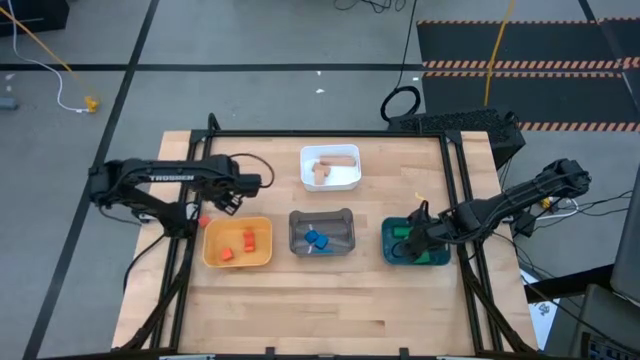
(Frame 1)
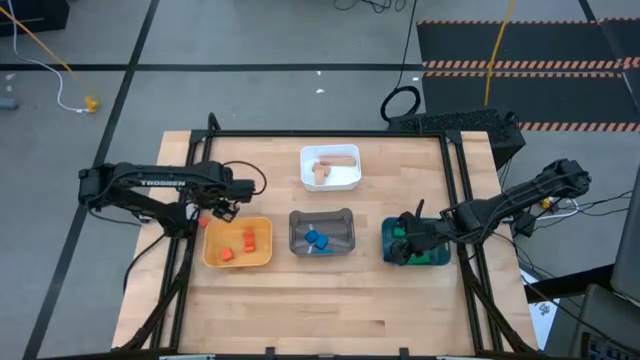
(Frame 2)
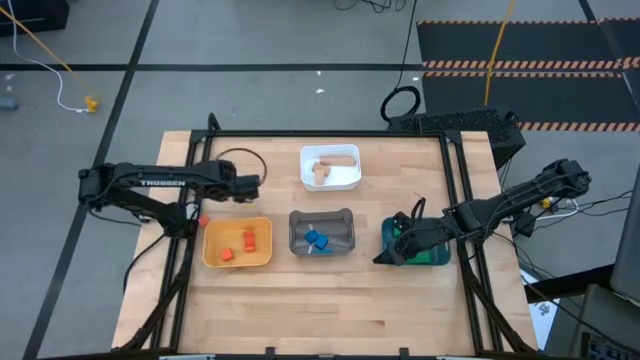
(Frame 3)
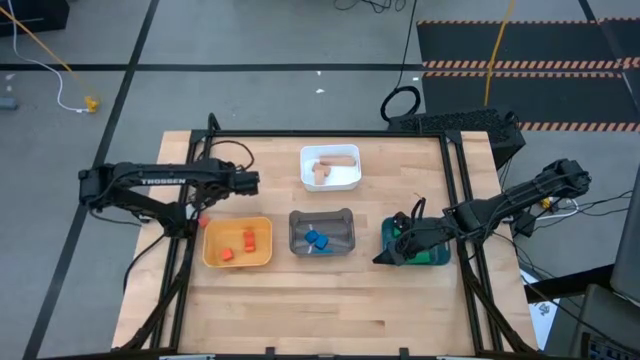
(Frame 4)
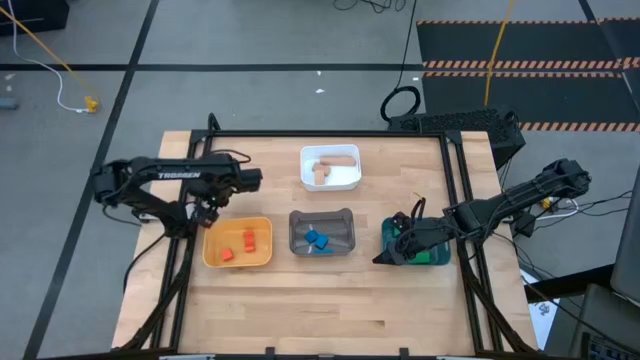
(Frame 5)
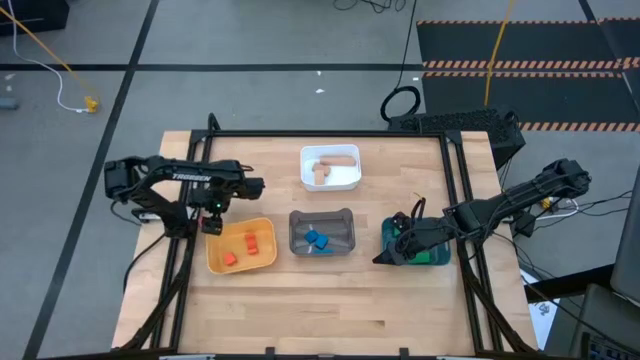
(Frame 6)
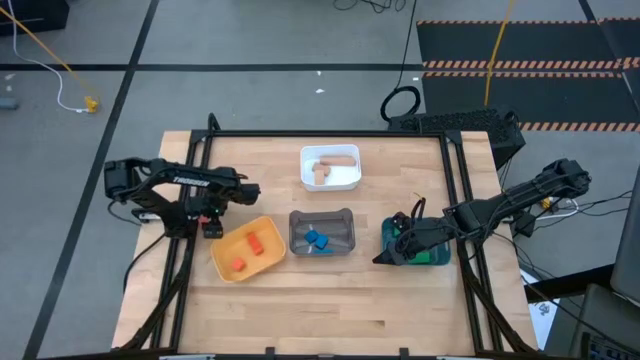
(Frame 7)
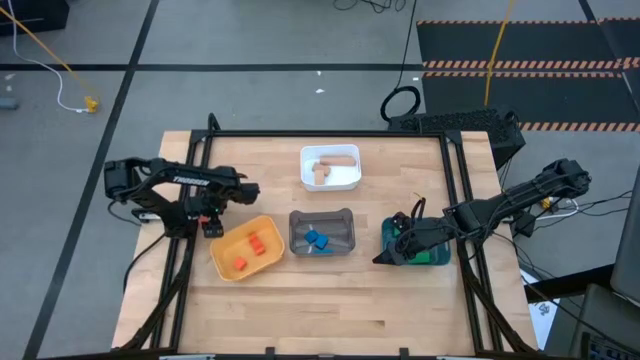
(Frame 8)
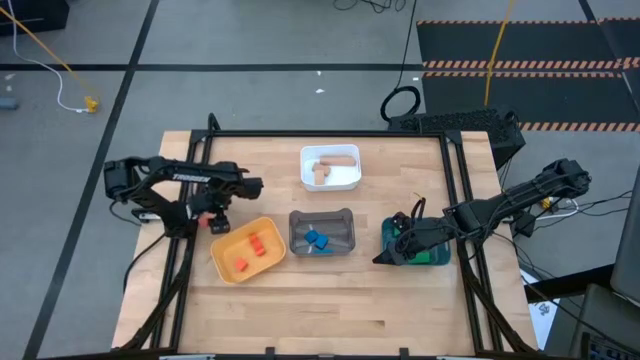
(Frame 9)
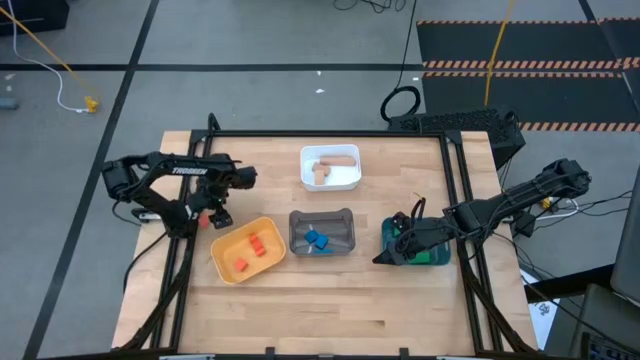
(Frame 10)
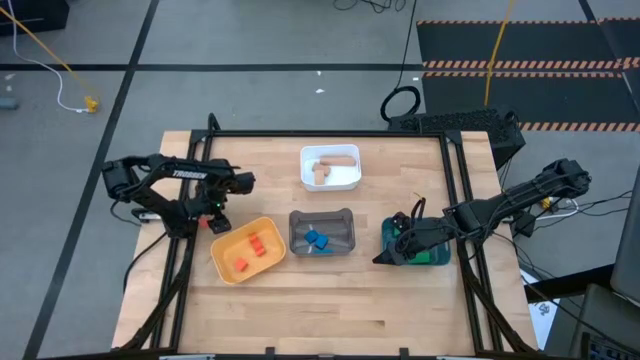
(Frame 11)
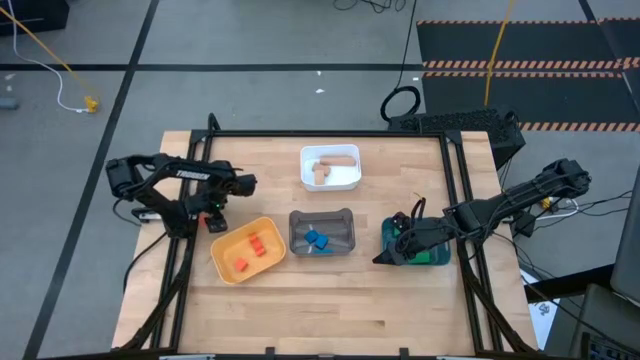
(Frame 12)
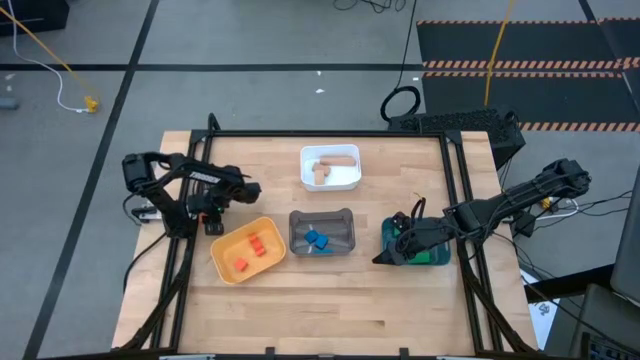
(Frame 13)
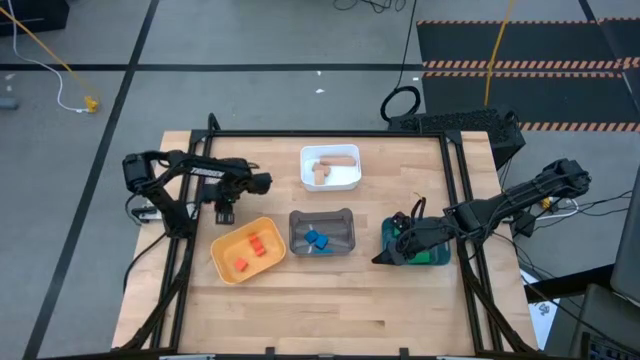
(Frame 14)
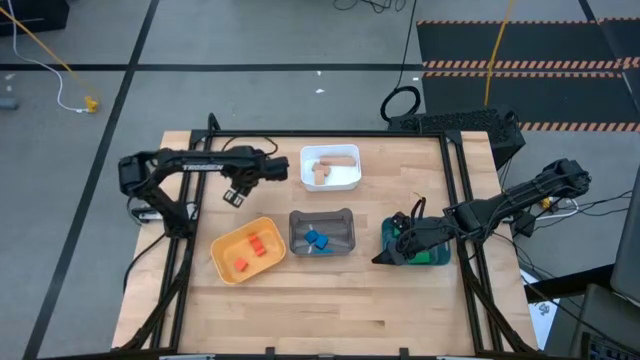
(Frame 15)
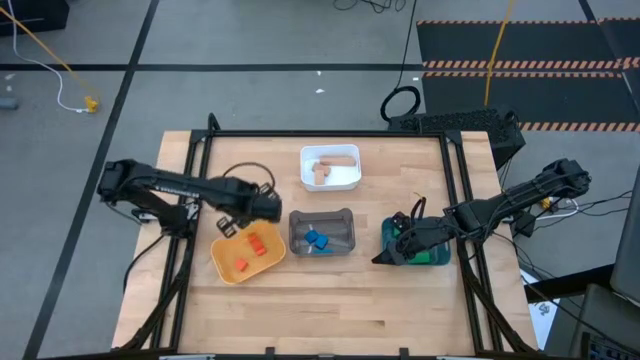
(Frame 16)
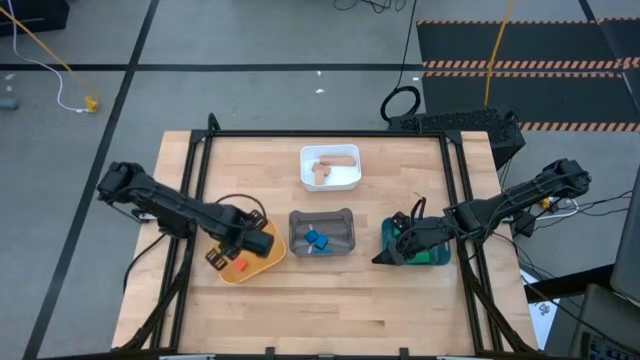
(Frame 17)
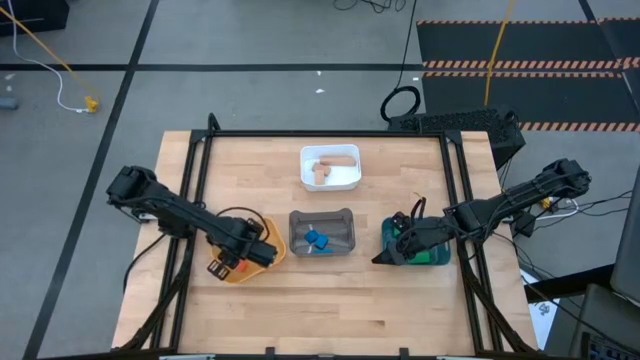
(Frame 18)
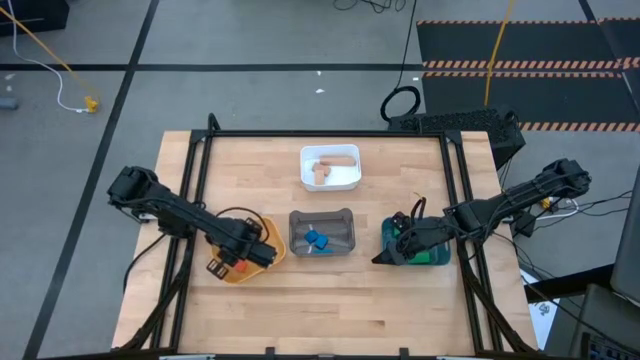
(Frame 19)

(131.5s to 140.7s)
Task: Sort & place blocks by color
Put the orange flat square block into the yellow bin

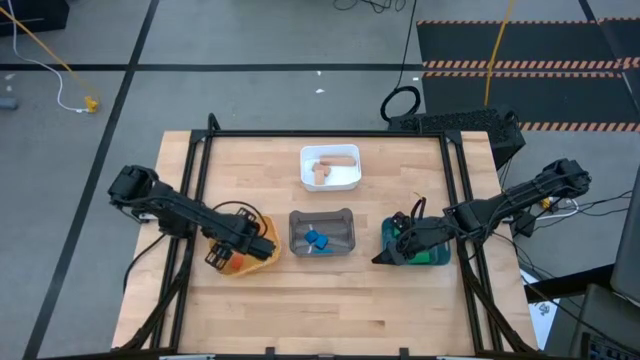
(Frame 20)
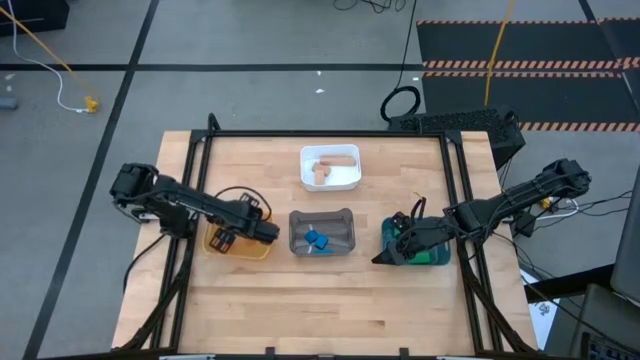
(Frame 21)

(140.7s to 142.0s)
Adjust the yellow bin

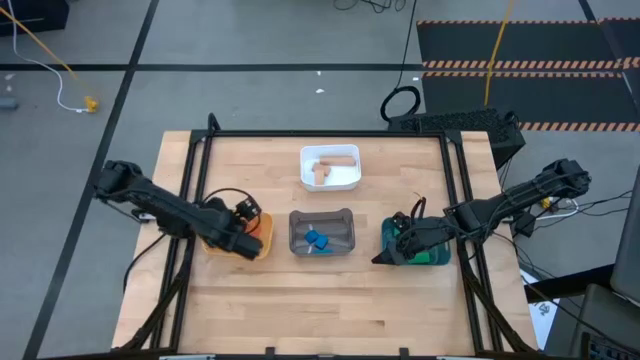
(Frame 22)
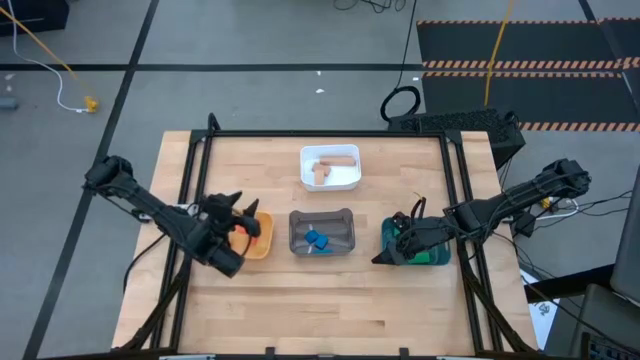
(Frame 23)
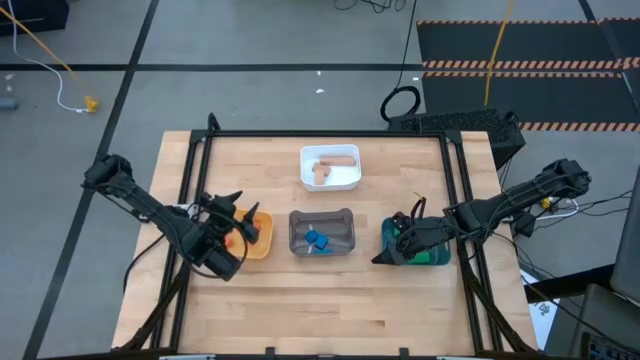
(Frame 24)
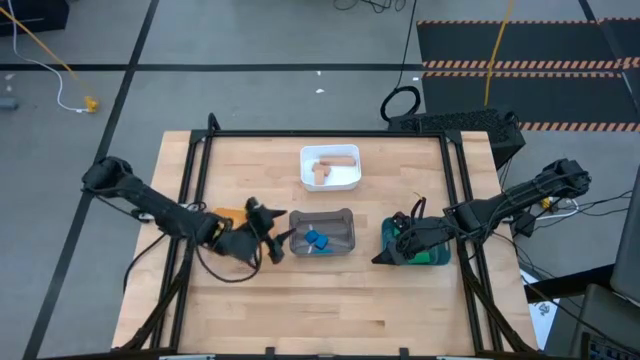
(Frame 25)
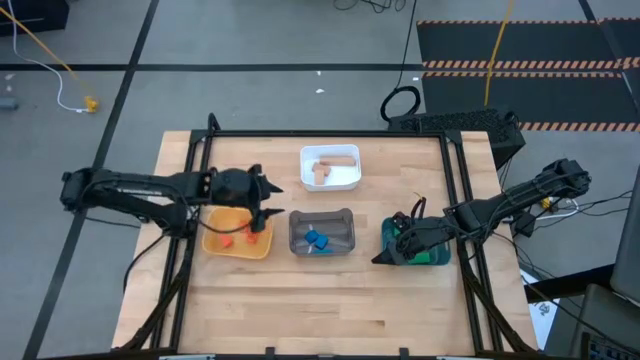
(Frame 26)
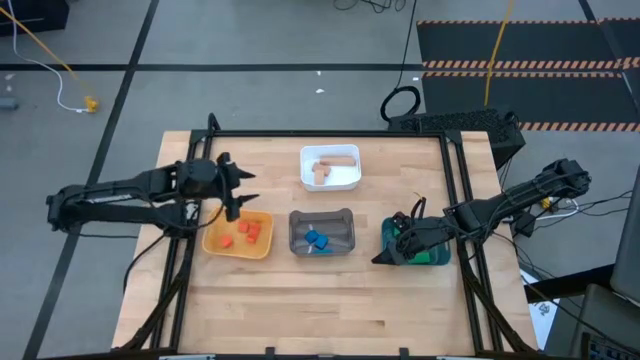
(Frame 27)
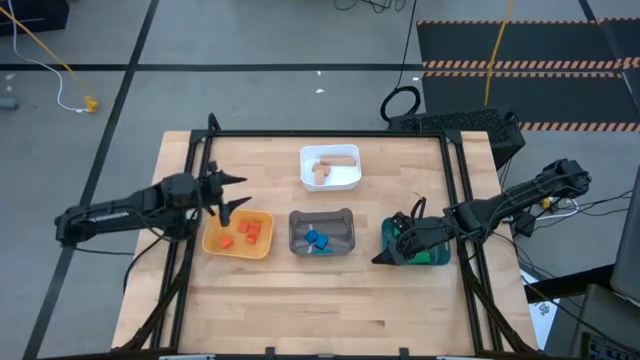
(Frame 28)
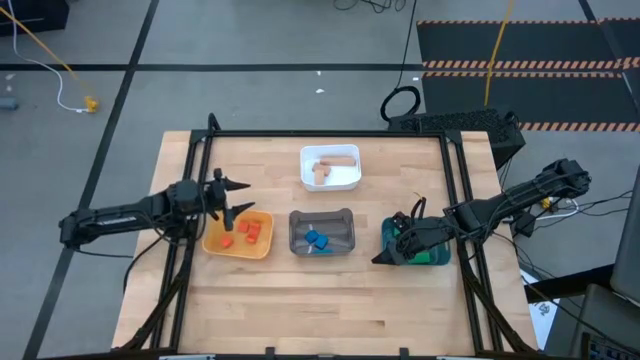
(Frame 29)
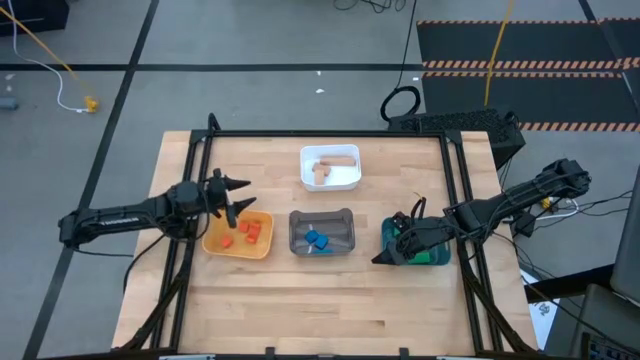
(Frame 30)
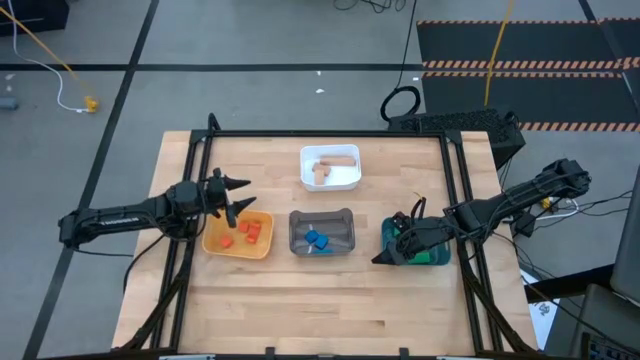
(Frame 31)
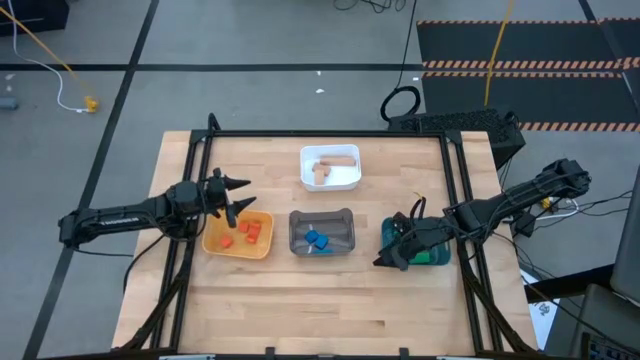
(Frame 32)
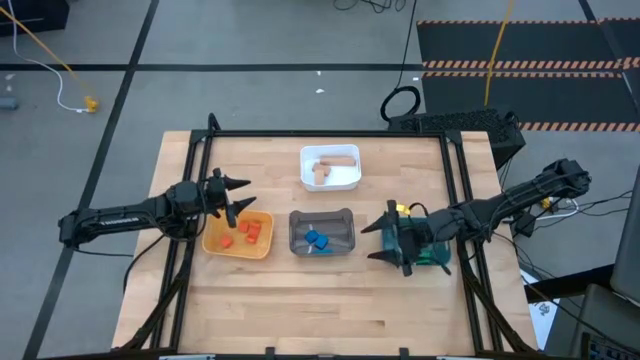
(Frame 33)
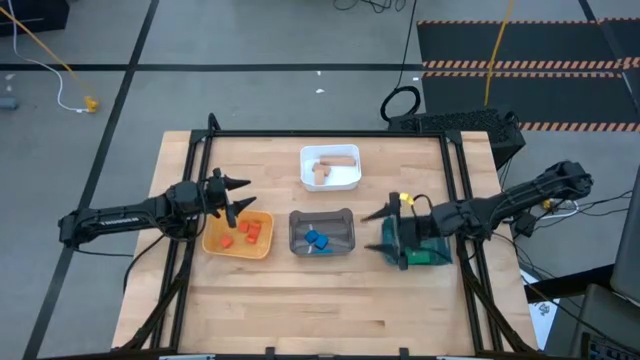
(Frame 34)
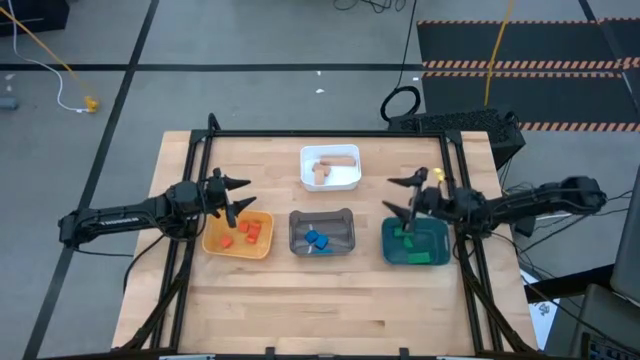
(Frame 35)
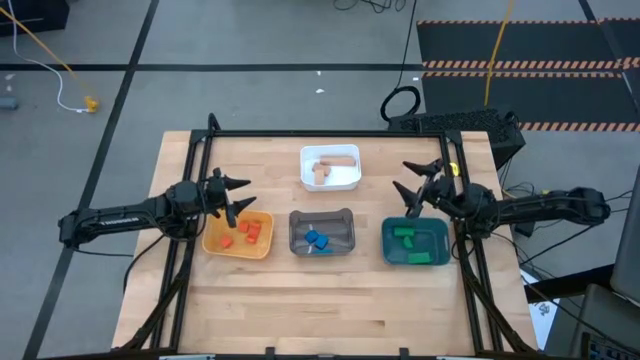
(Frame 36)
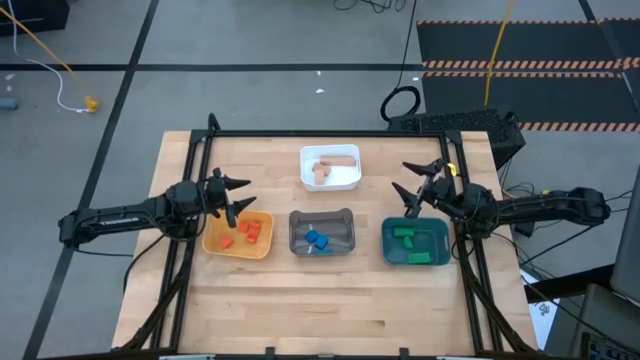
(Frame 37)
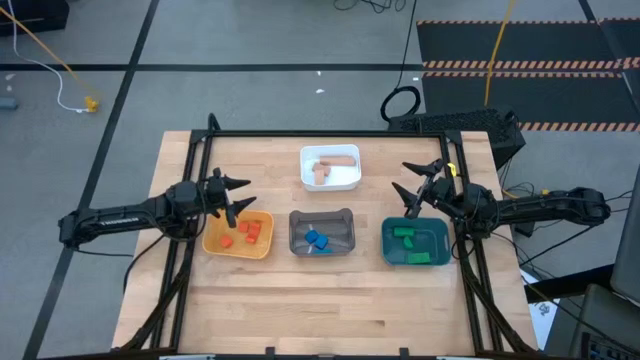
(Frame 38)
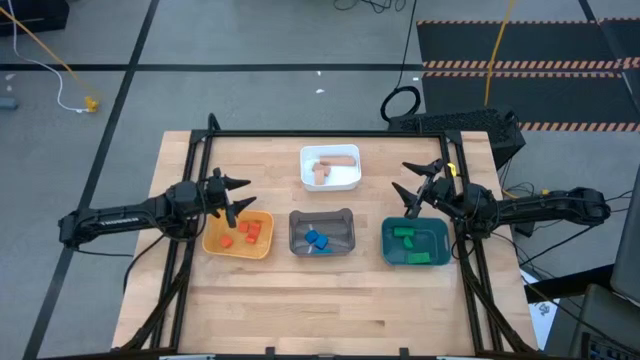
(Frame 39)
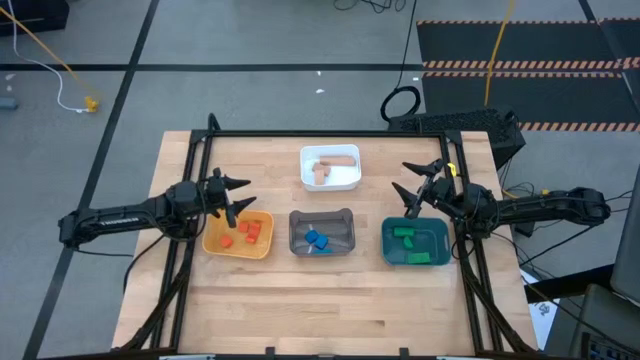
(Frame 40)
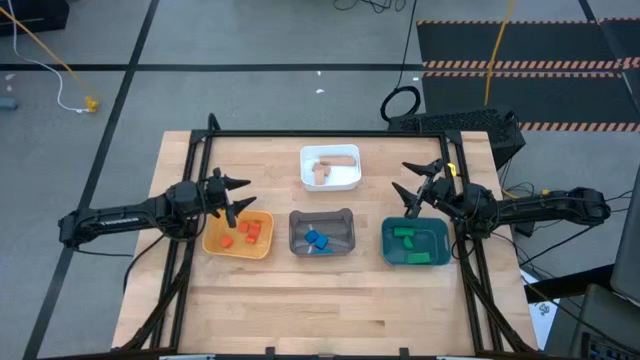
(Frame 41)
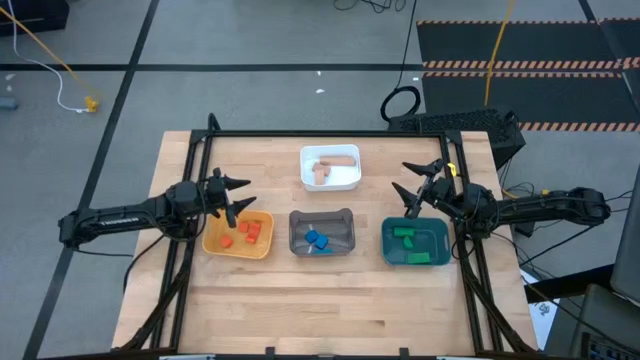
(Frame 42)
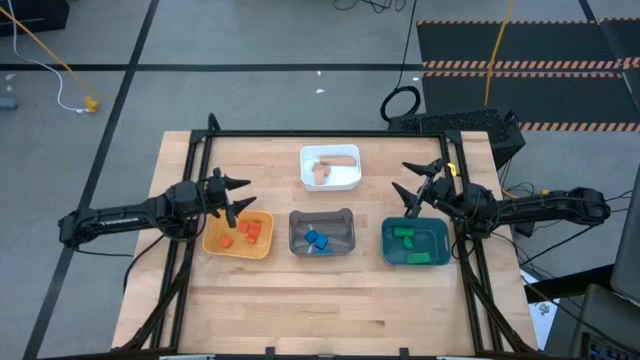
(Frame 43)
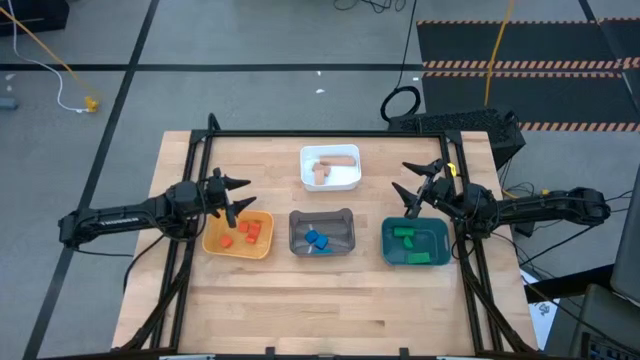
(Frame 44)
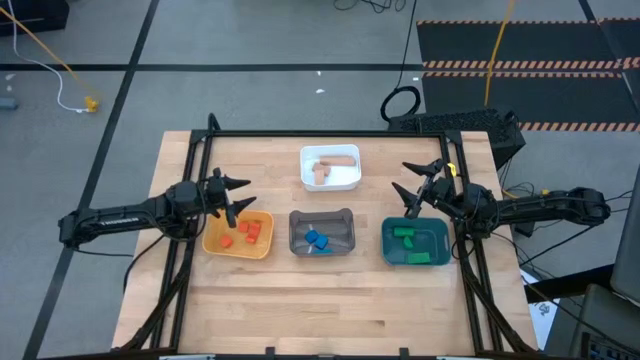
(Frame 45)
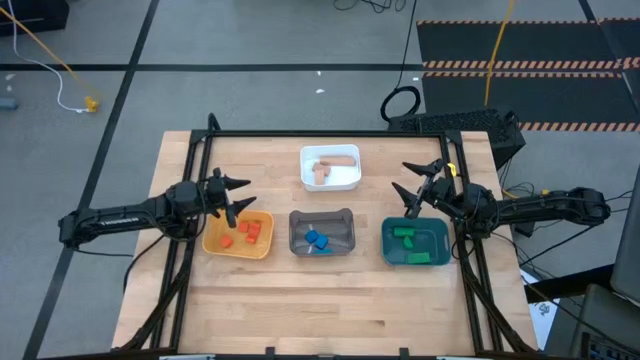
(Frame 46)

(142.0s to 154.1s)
Return to Home Position
